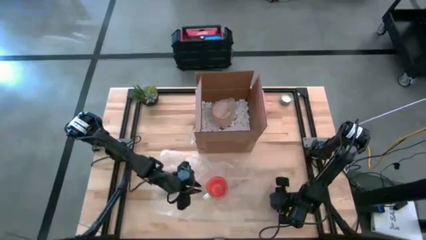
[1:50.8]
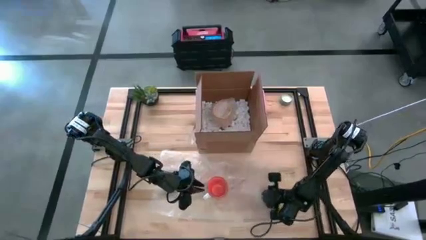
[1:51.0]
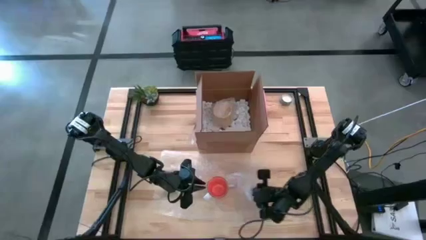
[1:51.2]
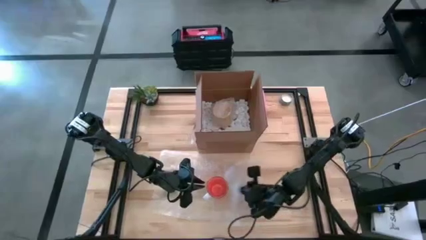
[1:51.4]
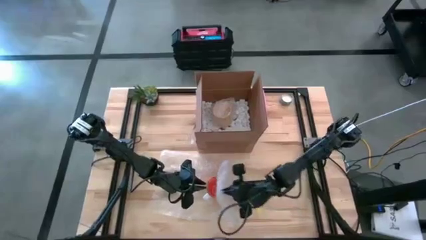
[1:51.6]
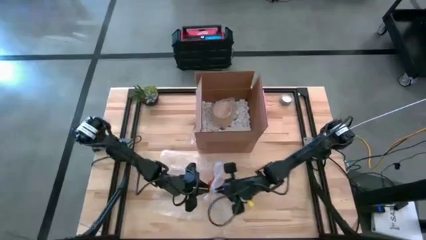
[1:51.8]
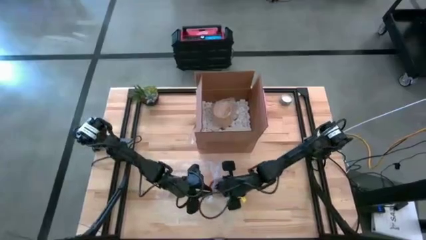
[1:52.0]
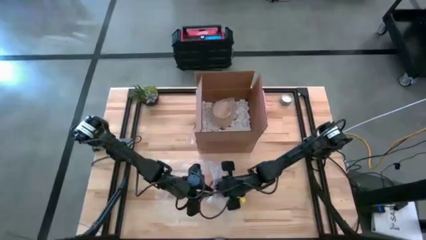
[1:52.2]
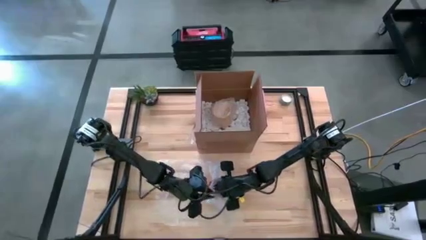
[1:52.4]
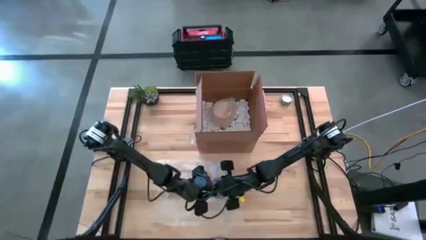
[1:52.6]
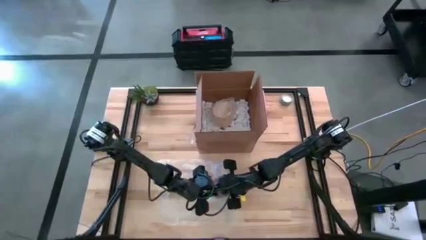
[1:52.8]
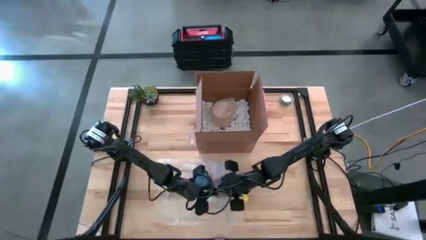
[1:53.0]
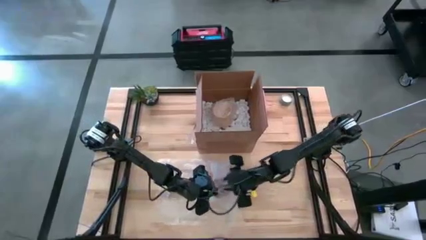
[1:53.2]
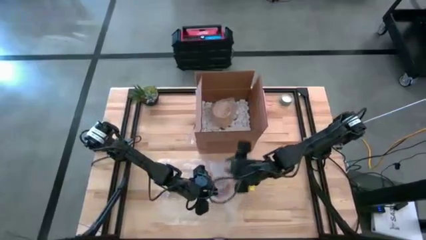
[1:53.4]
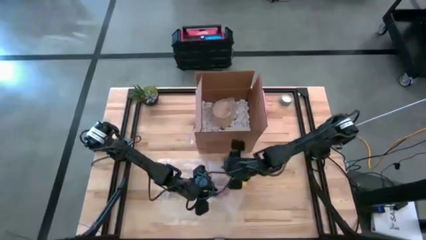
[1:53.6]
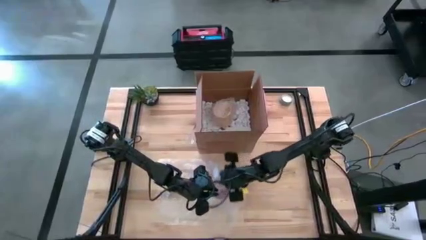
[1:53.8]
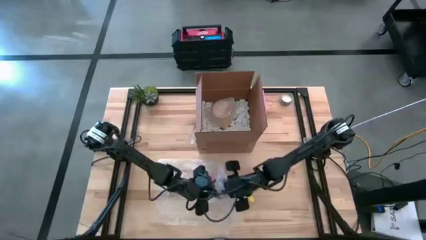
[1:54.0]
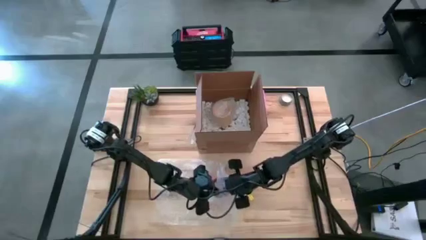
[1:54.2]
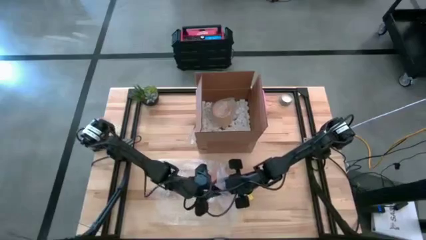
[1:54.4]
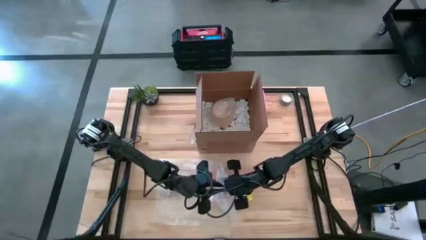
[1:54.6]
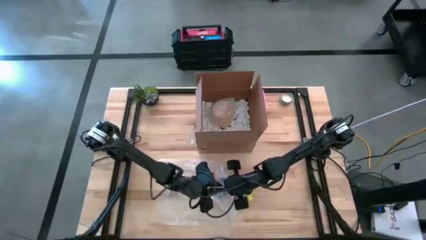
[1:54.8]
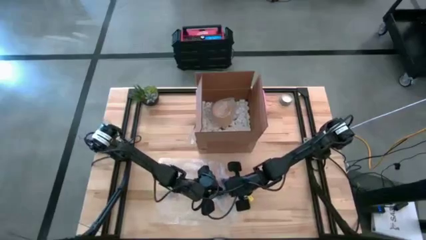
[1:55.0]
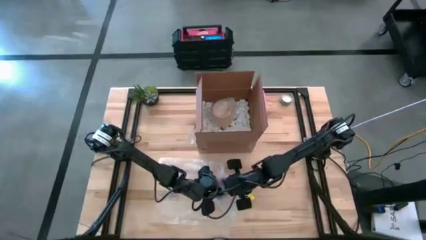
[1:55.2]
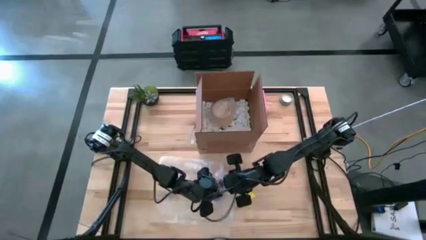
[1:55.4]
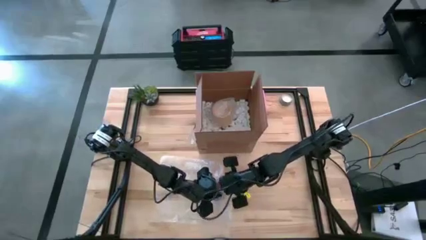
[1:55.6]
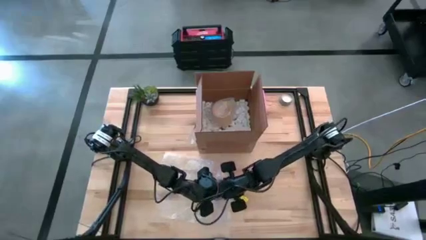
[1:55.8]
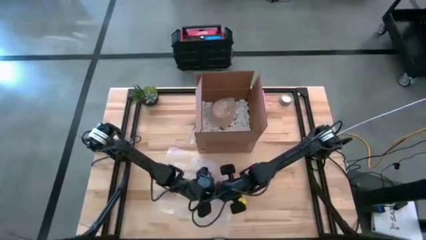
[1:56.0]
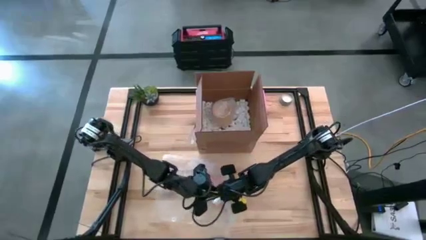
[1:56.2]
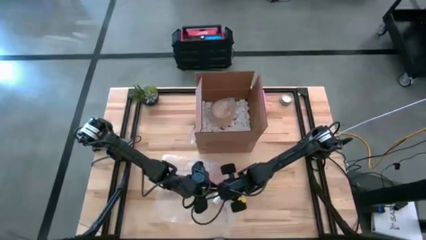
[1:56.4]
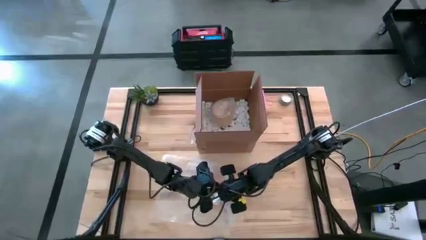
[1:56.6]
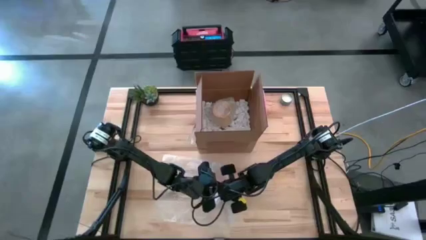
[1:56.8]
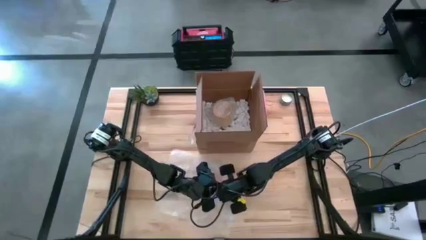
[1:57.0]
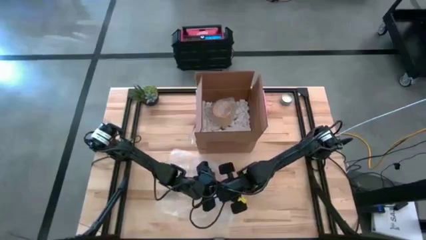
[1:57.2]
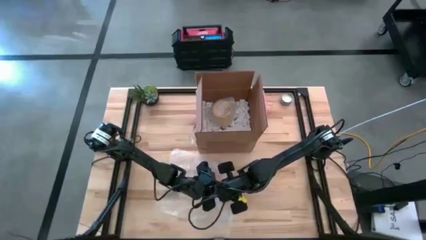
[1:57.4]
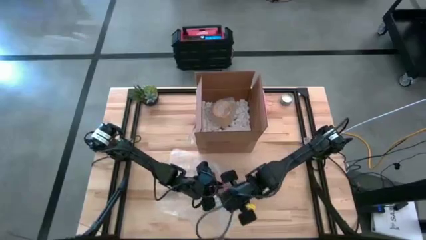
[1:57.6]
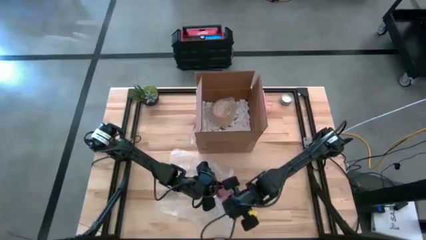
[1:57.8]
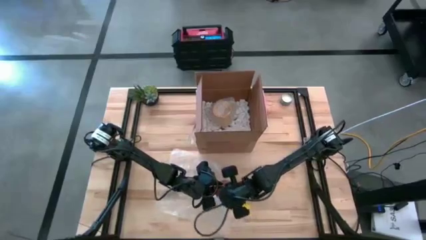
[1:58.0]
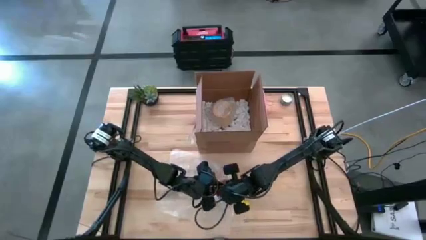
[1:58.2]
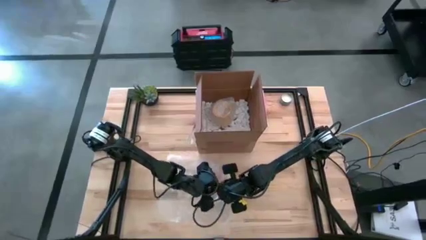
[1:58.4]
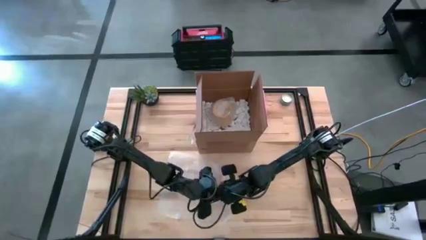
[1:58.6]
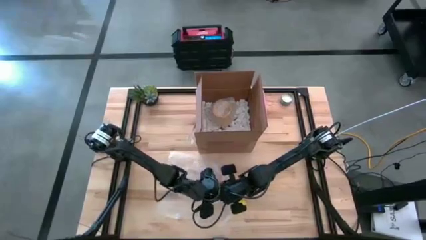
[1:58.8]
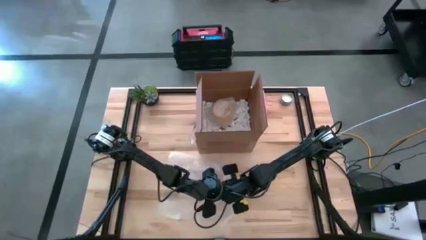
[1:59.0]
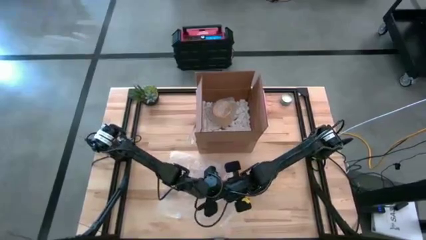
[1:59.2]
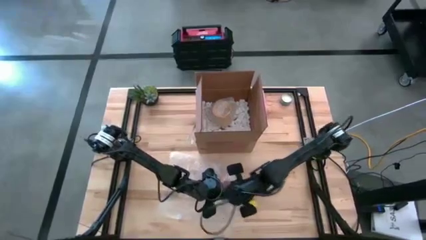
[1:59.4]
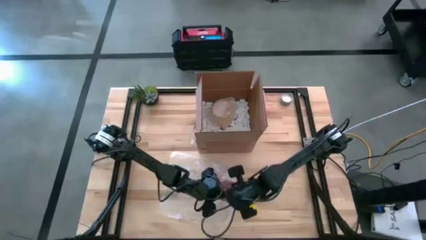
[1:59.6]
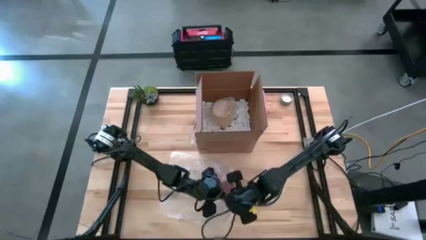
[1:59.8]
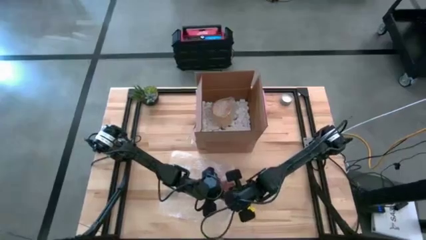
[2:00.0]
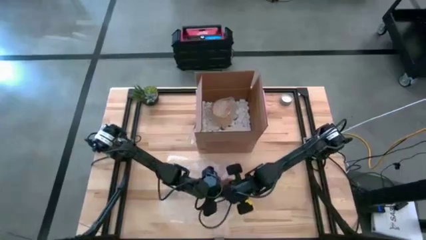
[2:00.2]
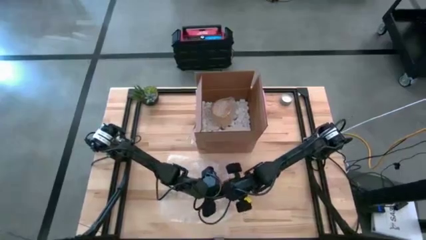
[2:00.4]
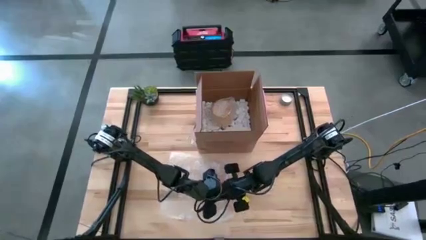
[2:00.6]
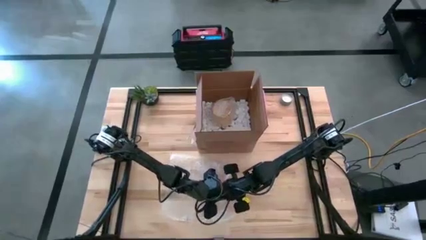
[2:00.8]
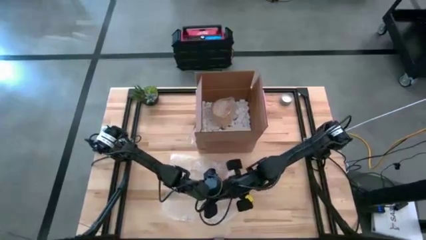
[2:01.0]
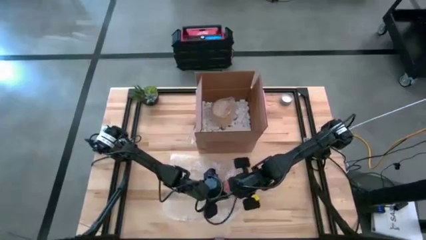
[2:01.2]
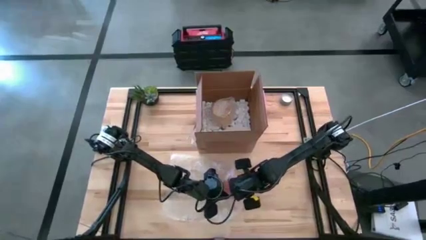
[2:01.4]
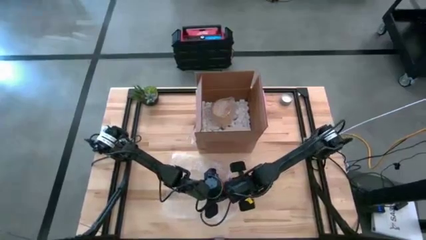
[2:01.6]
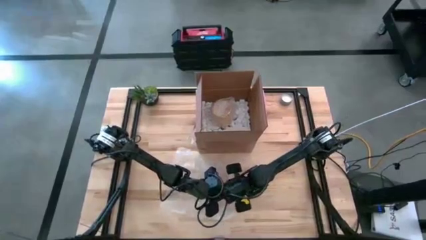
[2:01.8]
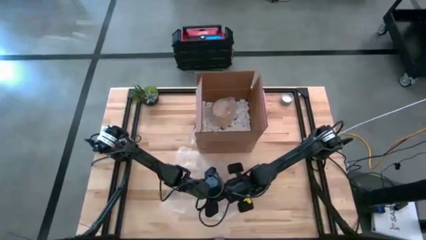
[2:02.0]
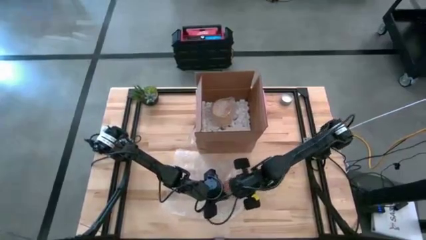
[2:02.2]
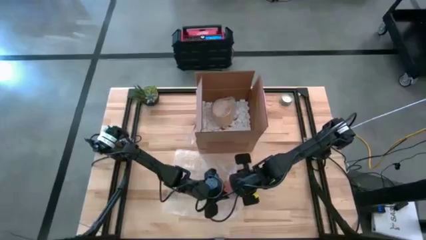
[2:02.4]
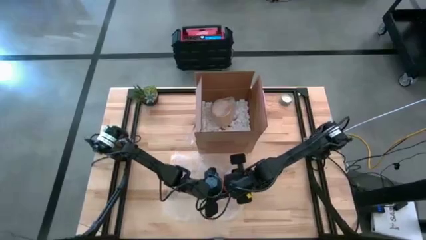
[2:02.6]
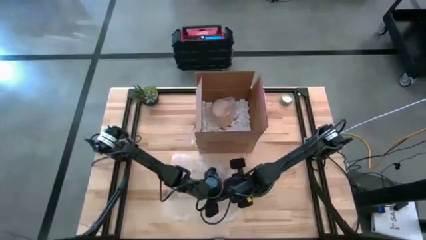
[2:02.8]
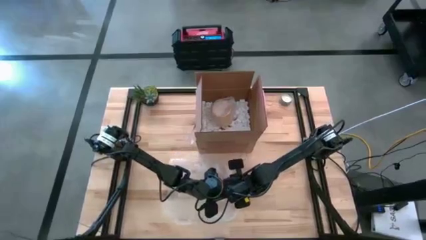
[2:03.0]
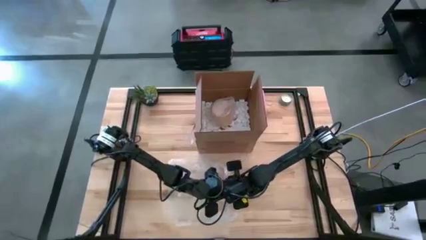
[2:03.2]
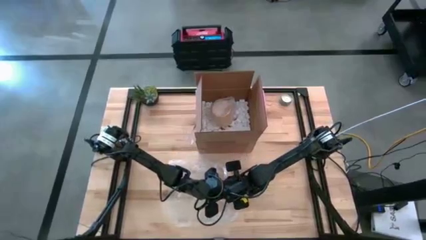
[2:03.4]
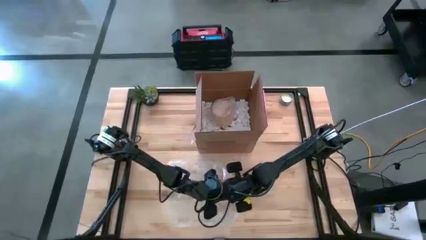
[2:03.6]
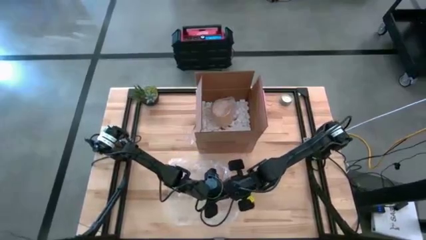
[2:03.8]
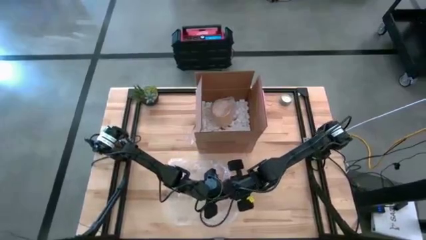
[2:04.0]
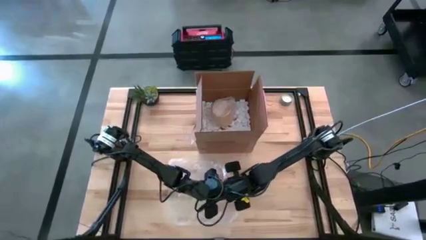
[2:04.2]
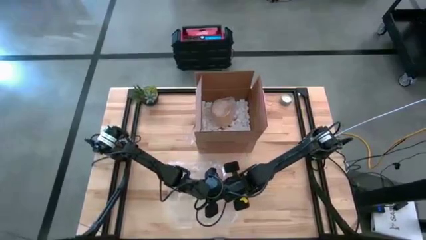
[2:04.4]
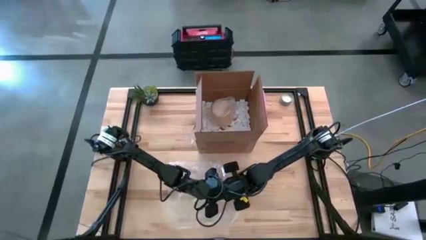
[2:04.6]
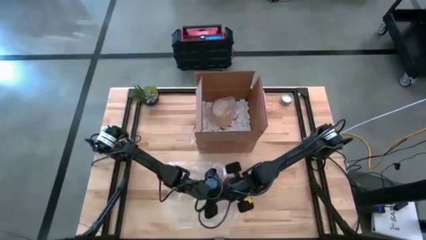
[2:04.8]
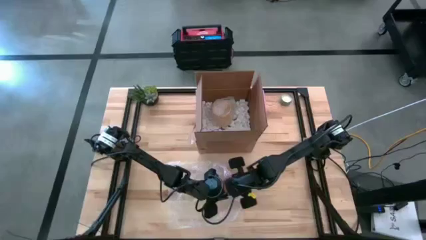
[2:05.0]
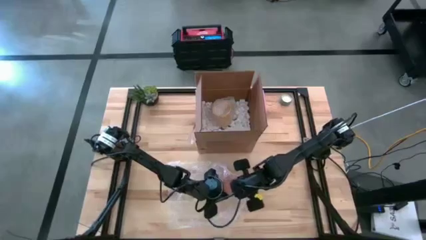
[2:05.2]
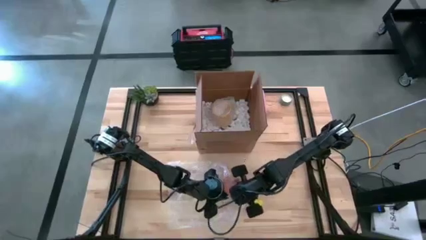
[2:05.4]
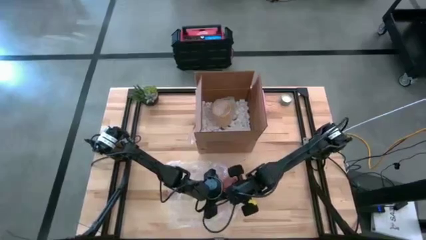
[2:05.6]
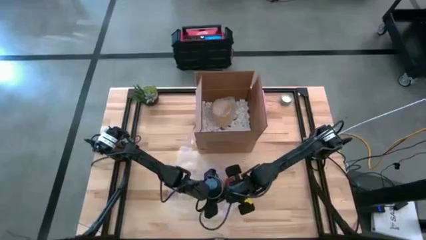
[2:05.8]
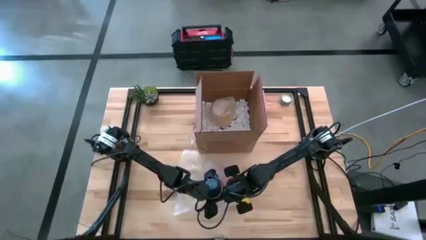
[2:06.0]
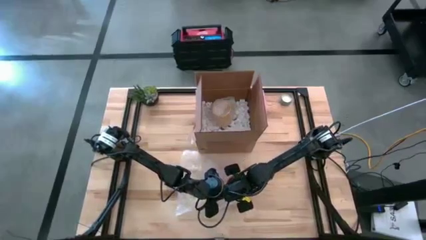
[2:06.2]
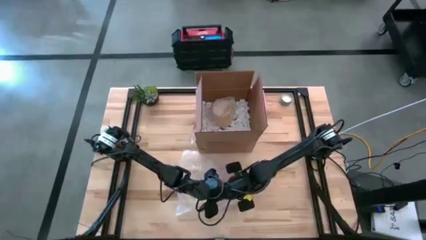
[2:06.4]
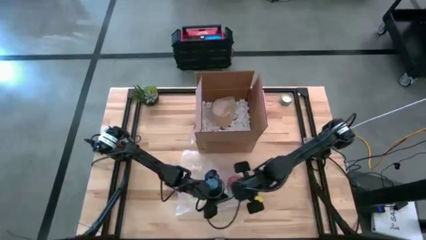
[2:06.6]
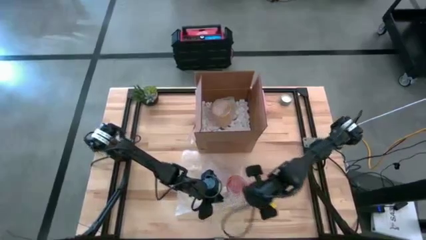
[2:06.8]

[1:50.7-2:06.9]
Task: wrap mug
Wrap the orange mug with bubble wrap
